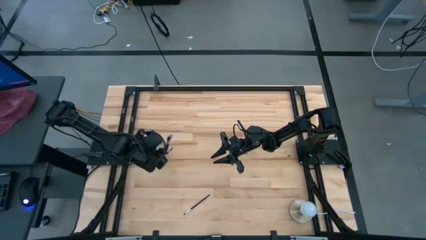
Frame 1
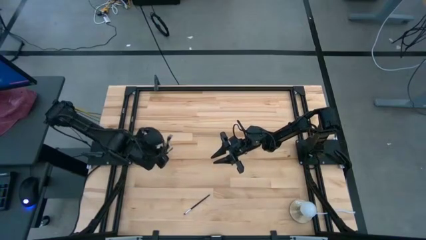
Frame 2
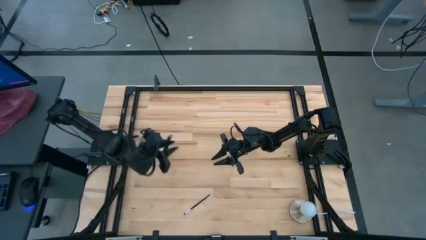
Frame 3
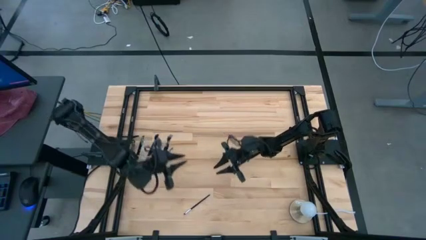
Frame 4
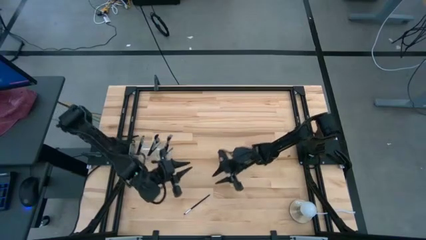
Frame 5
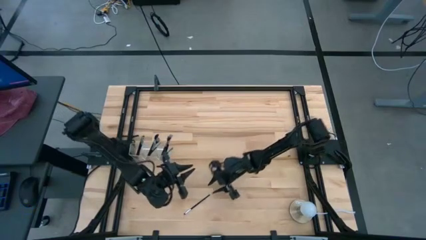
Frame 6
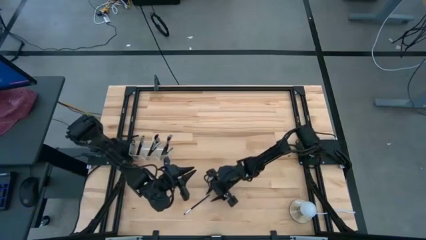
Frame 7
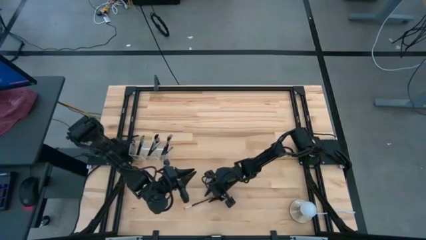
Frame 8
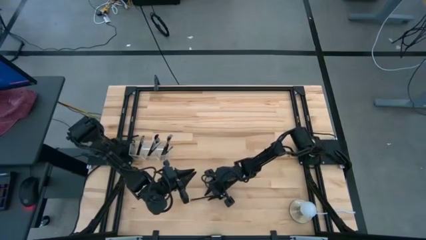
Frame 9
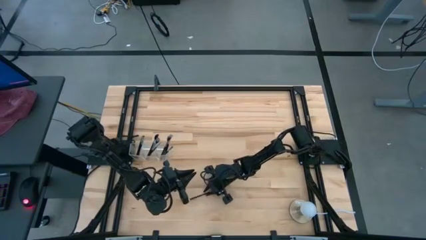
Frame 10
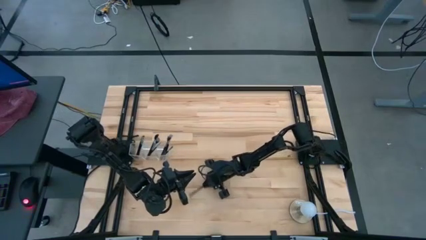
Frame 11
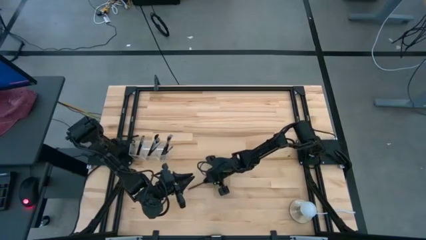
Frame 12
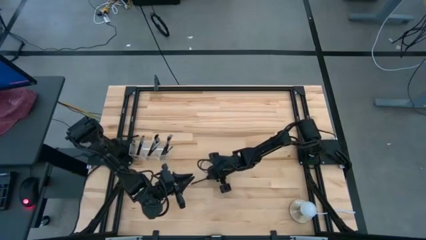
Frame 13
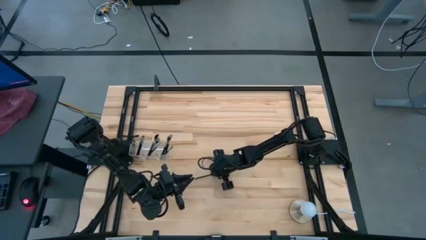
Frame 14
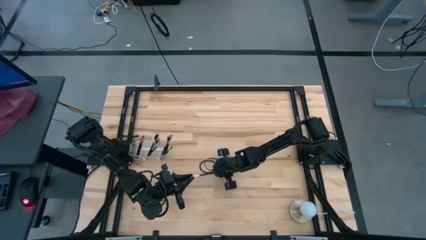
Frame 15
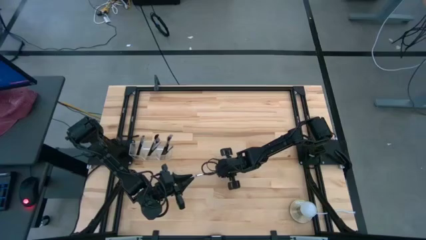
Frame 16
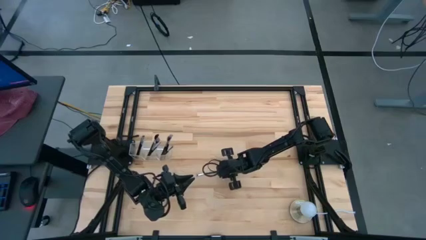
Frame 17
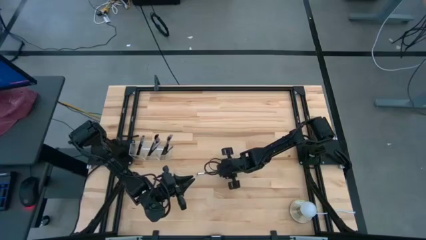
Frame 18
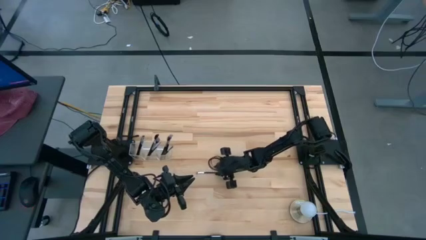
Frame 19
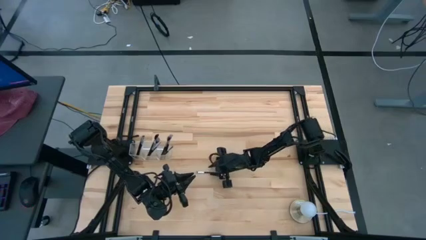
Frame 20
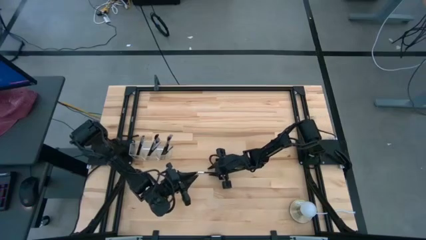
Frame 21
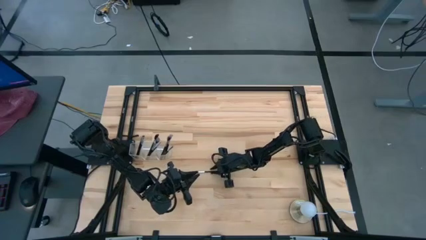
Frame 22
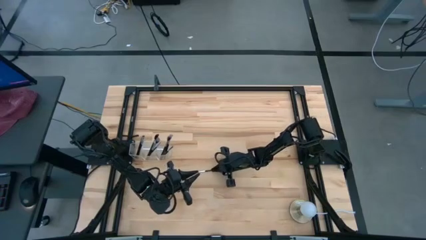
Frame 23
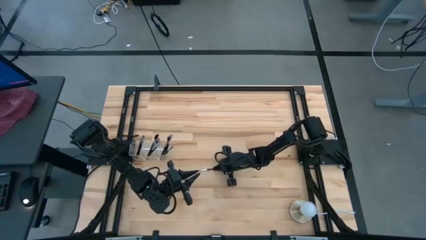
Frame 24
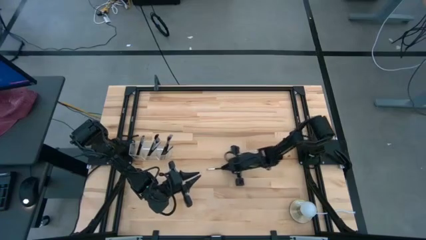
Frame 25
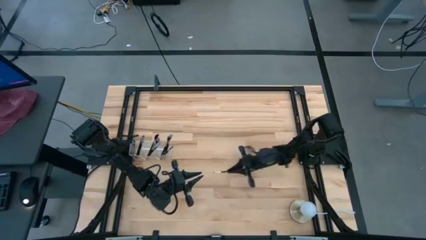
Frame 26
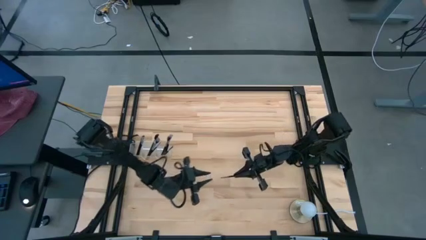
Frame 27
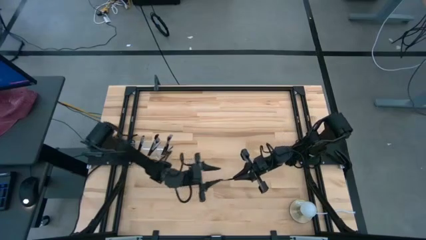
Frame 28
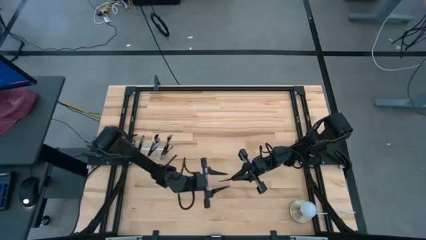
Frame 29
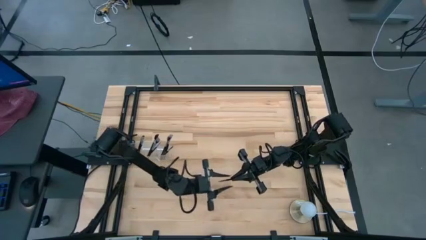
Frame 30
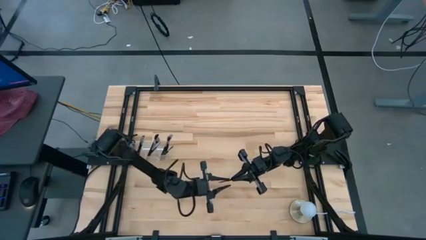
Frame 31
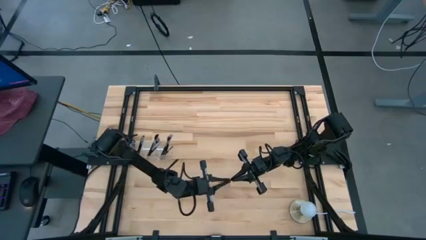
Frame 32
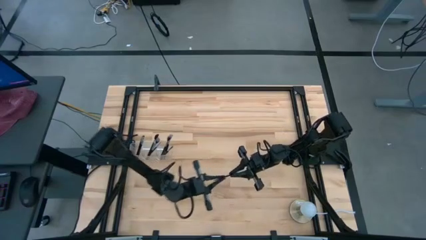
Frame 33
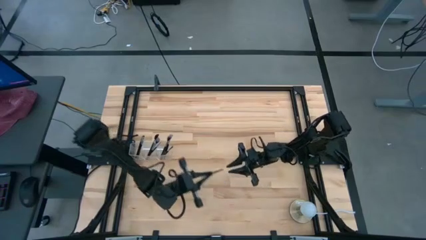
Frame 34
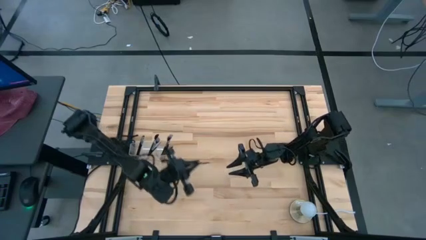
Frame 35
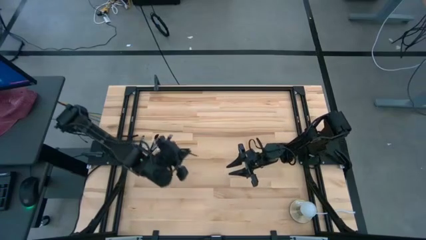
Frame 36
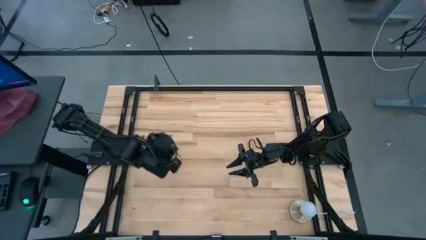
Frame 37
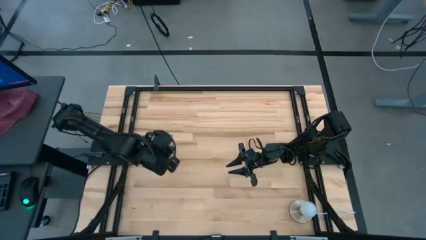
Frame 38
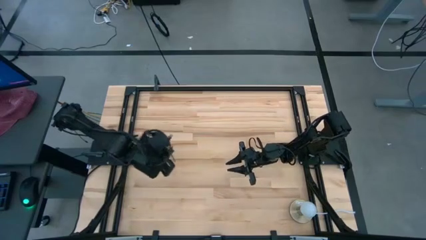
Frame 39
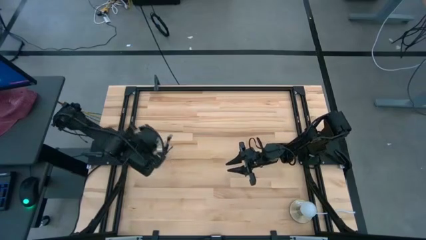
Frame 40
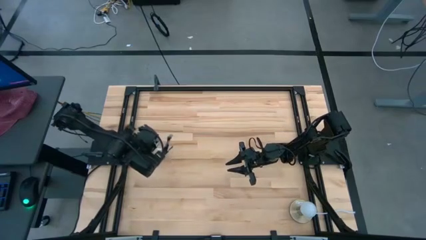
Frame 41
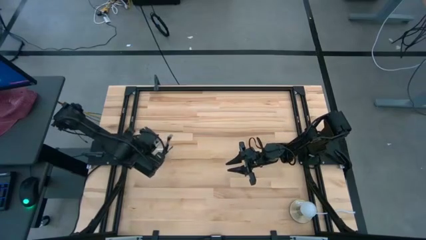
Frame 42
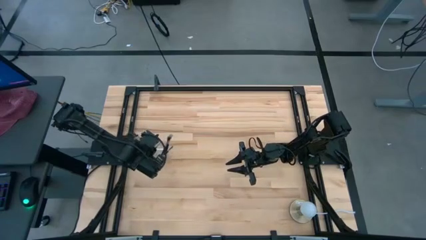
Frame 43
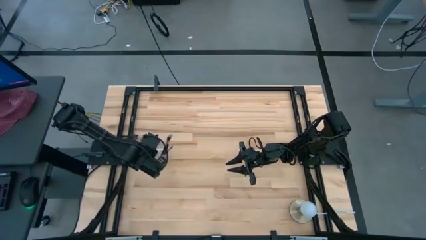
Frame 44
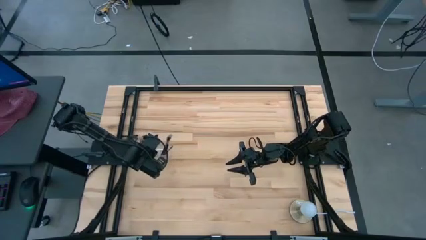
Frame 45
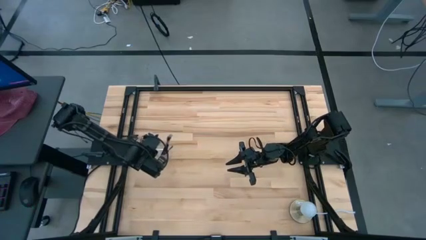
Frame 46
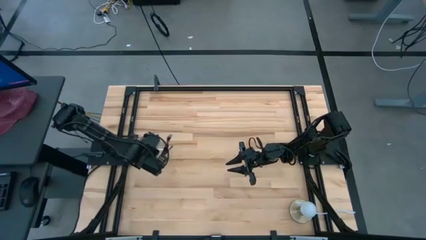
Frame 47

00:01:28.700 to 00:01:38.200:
Task: Put items in baskets/containers
Put the black eyeshadow brush into the transparent organizer

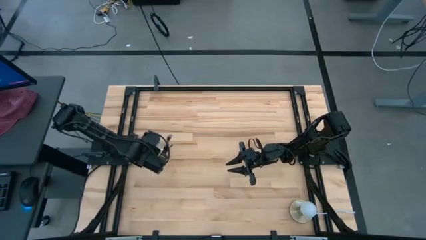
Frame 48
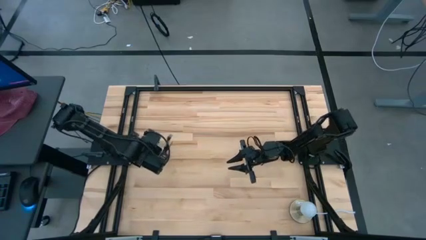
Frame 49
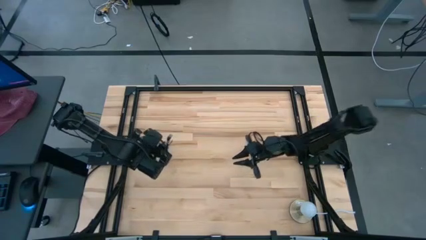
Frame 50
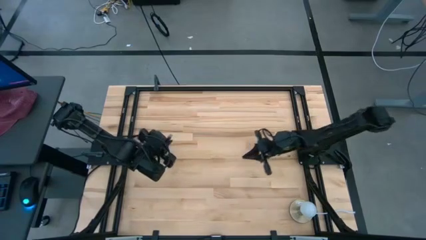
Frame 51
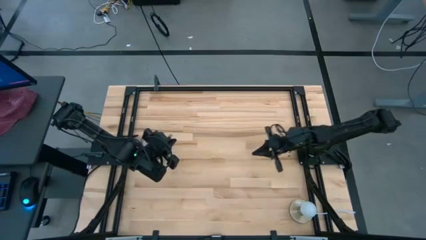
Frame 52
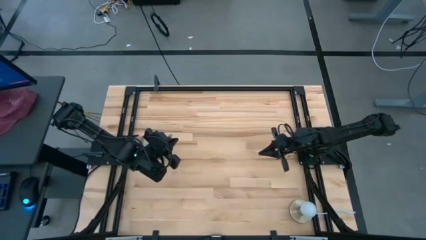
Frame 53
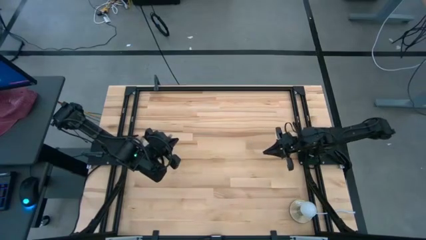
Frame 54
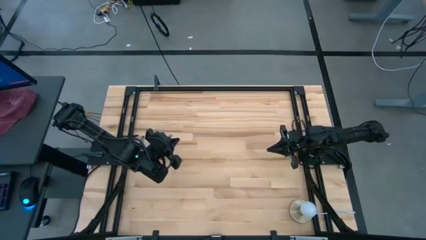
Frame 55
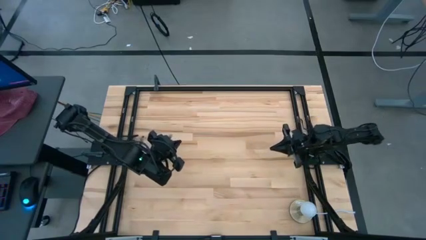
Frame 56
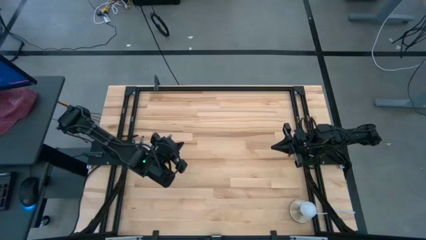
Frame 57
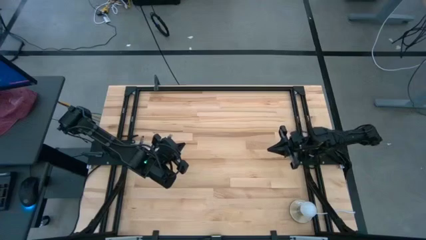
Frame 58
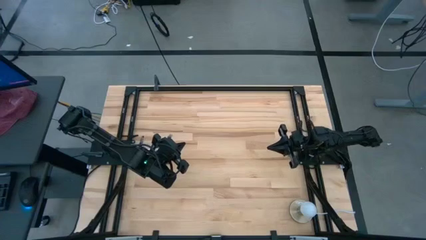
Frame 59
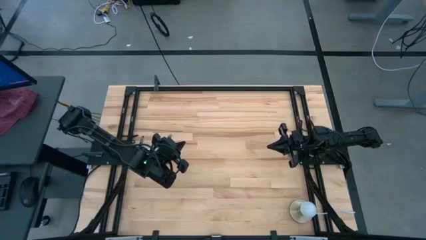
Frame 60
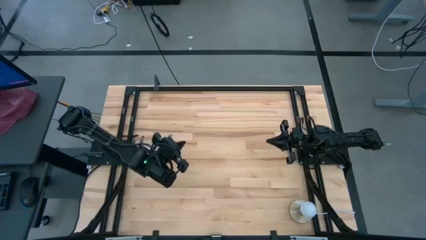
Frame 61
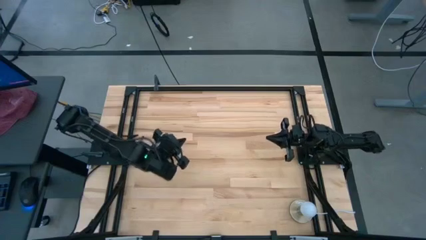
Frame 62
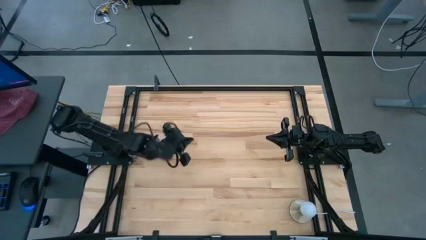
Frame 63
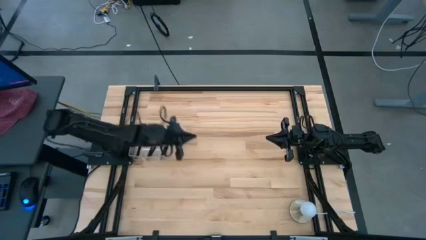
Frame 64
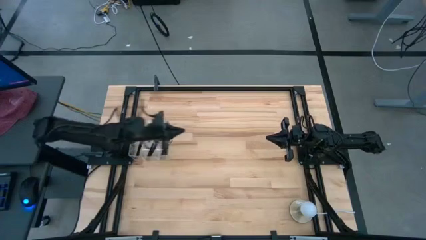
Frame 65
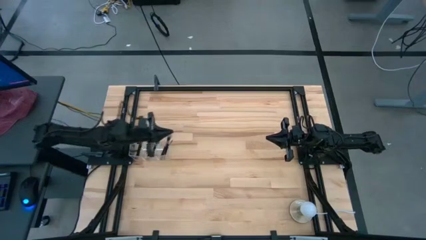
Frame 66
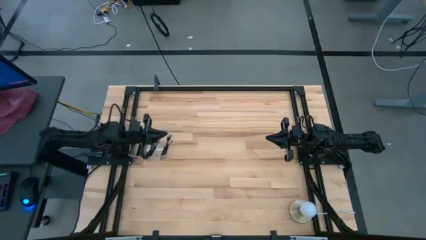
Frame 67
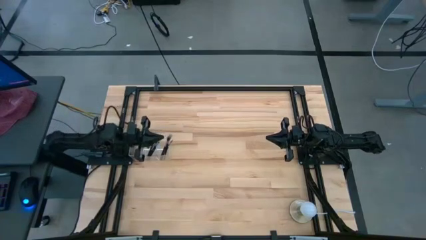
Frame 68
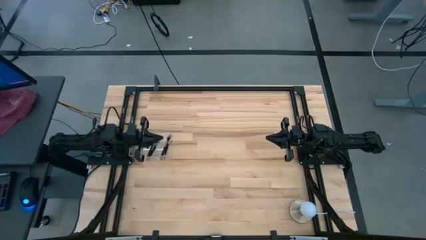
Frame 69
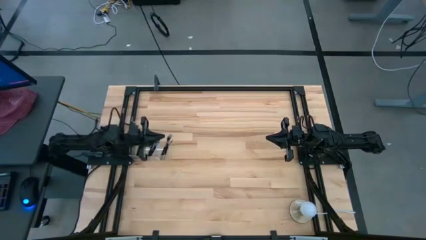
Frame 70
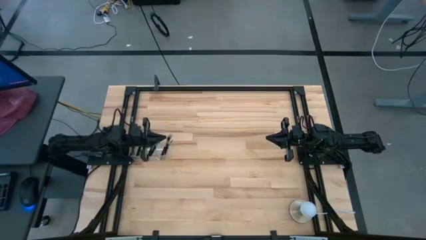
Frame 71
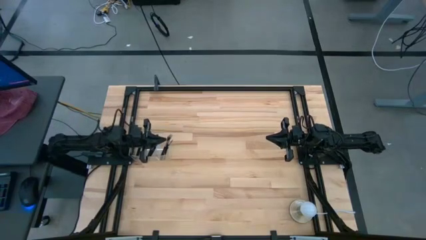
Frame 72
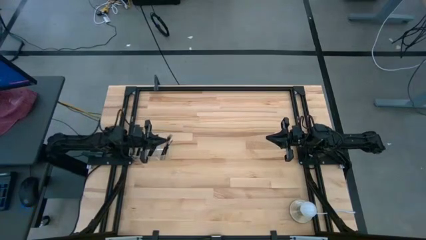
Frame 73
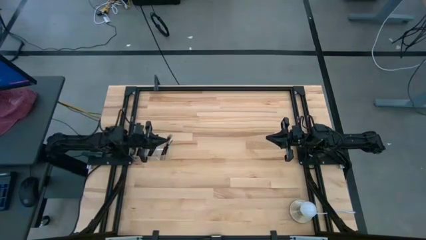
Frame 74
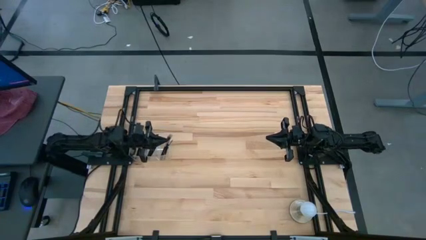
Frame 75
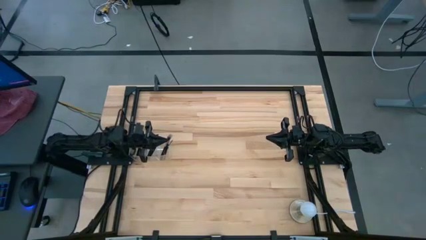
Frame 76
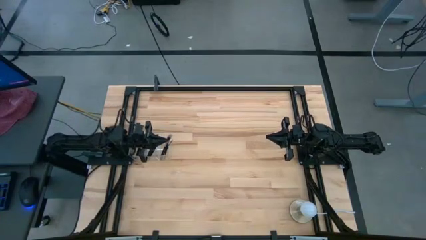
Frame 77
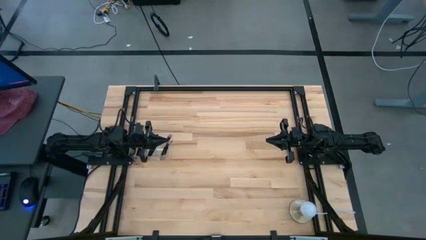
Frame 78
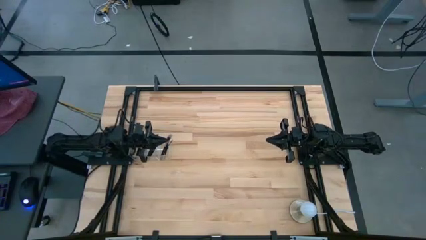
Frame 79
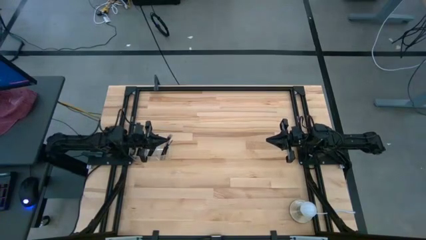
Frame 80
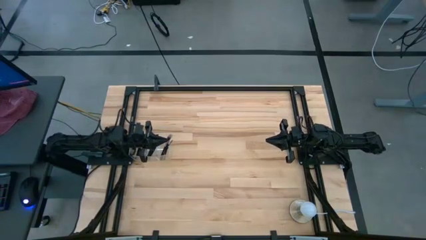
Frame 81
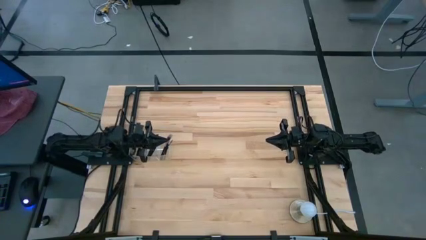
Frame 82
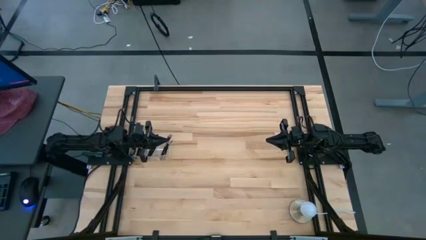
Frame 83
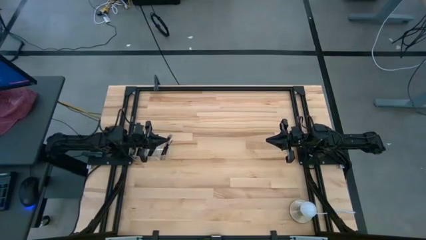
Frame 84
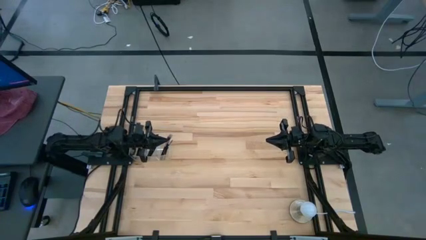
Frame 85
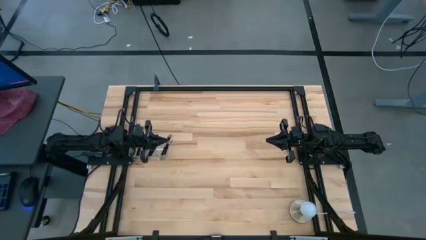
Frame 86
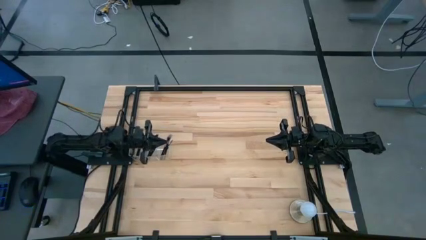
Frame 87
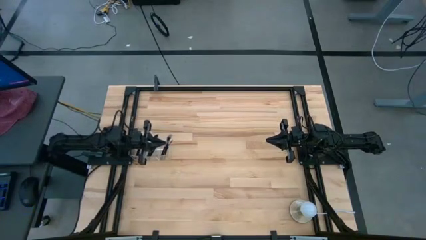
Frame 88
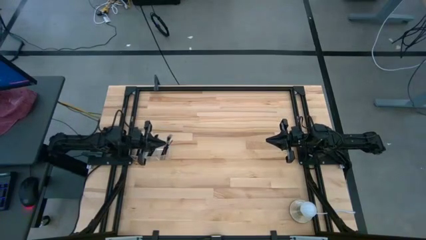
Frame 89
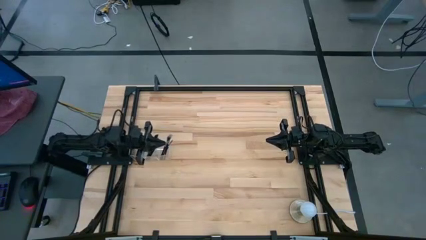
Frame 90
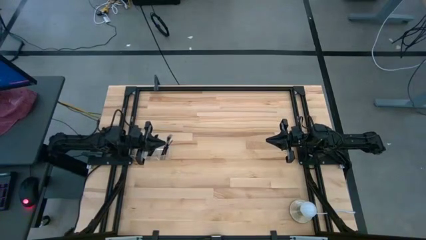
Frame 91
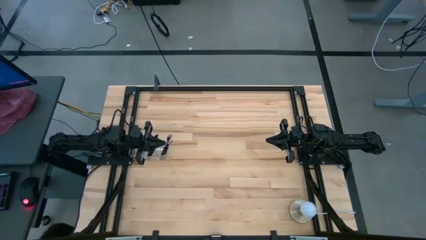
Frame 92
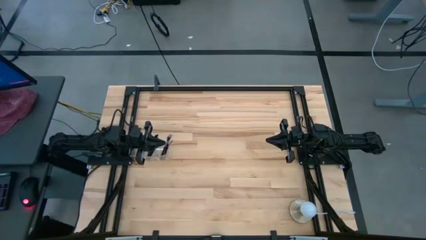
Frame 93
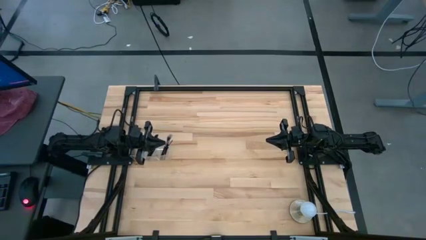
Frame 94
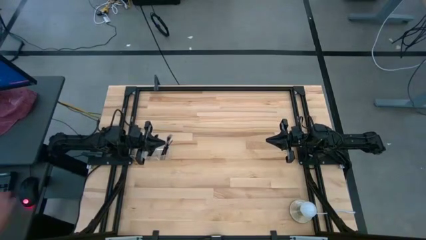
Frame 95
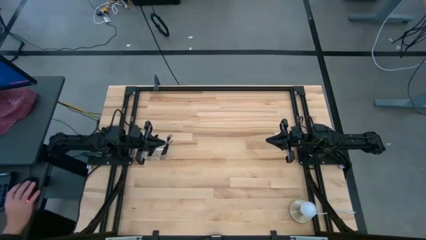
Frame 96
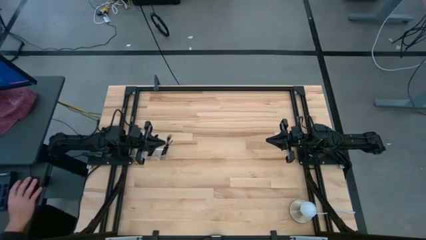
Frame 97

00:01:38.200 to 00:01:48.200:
Return to Home Position
